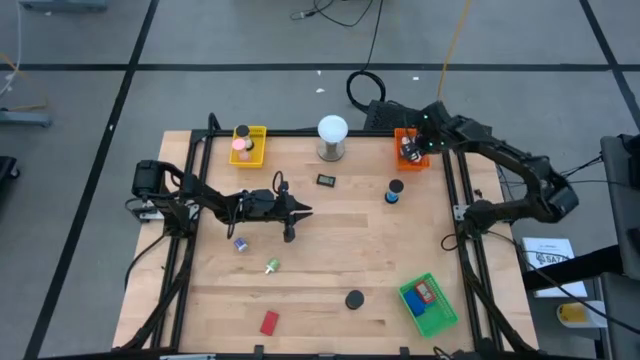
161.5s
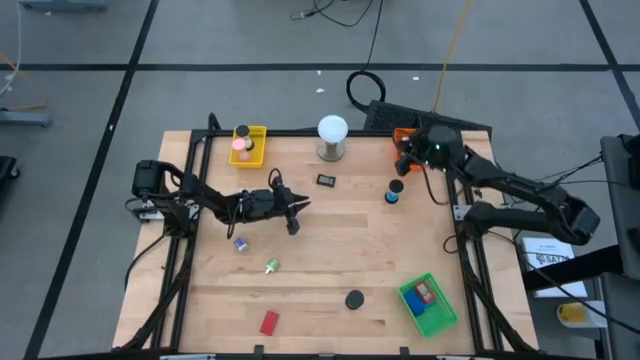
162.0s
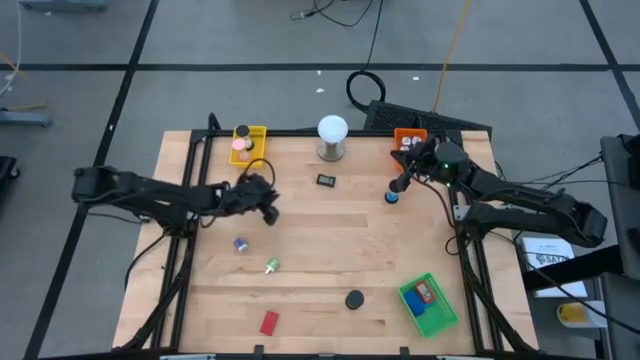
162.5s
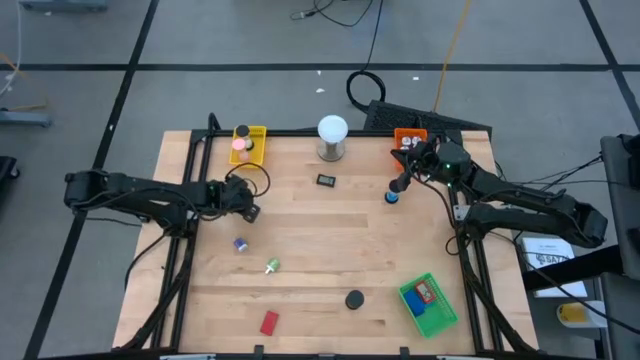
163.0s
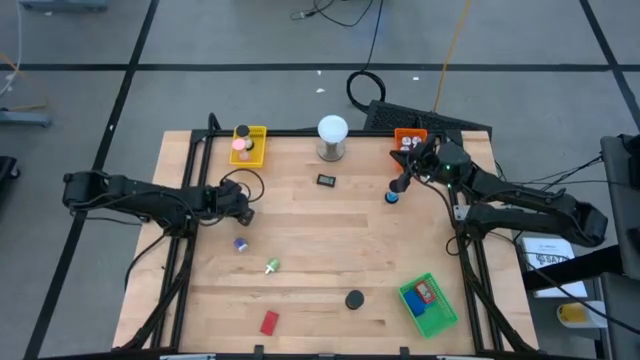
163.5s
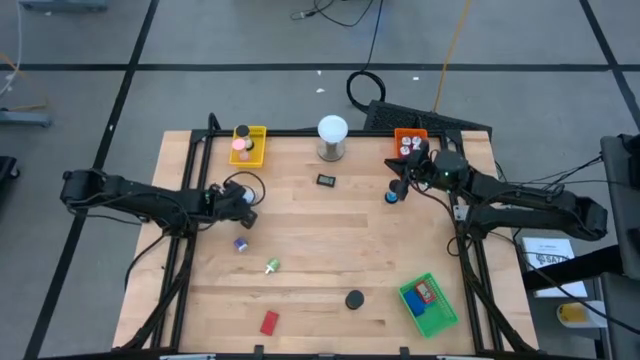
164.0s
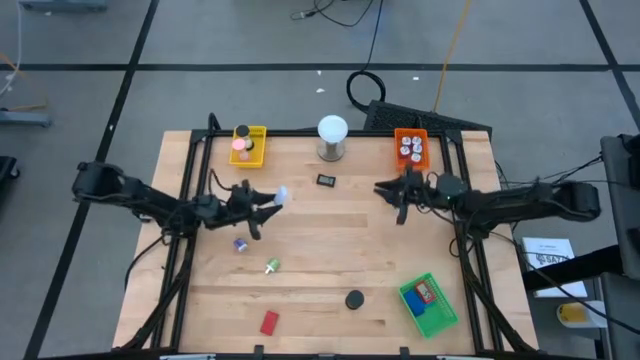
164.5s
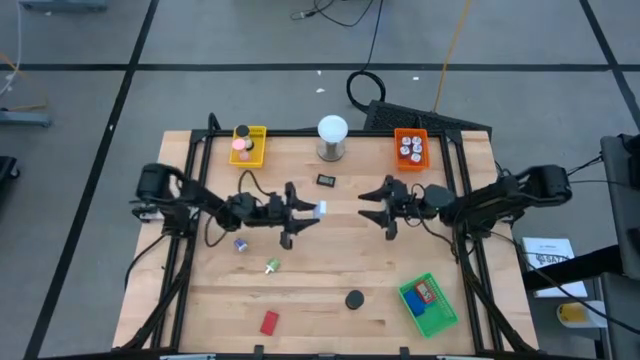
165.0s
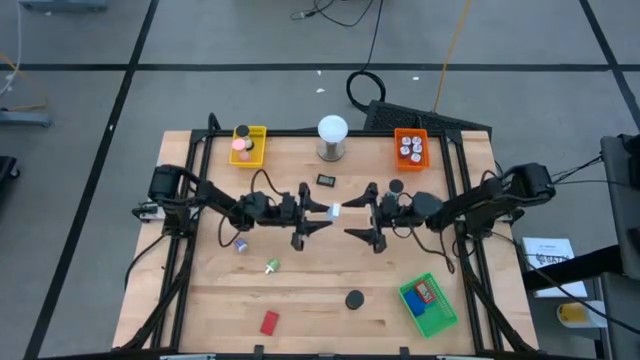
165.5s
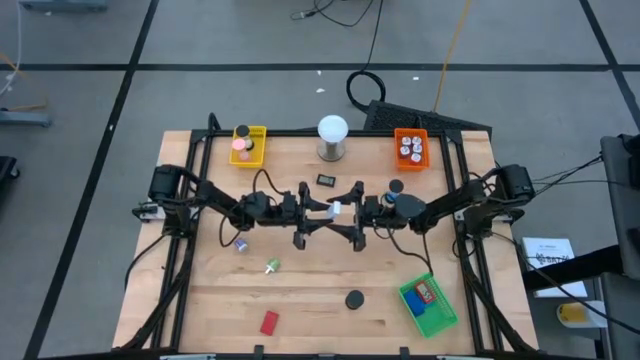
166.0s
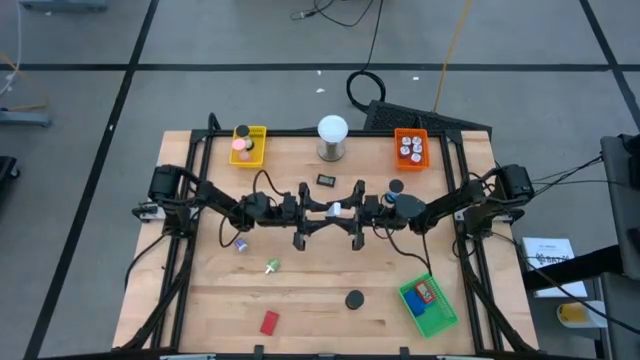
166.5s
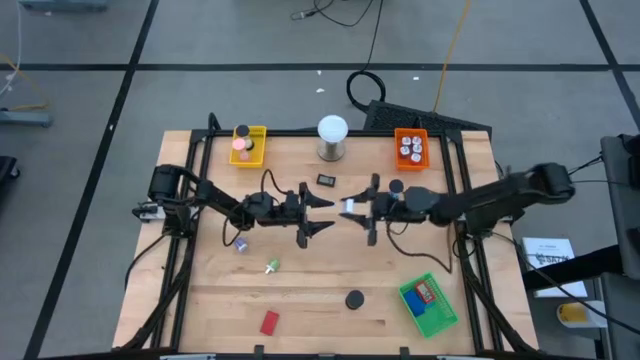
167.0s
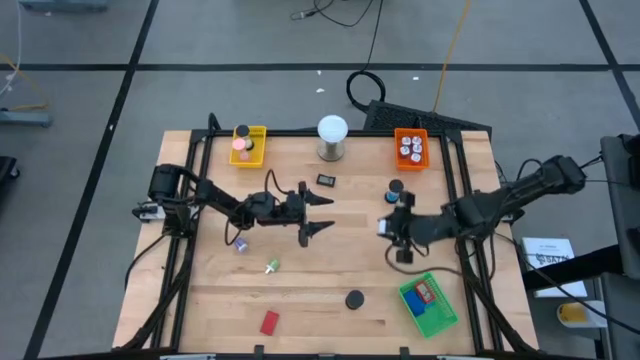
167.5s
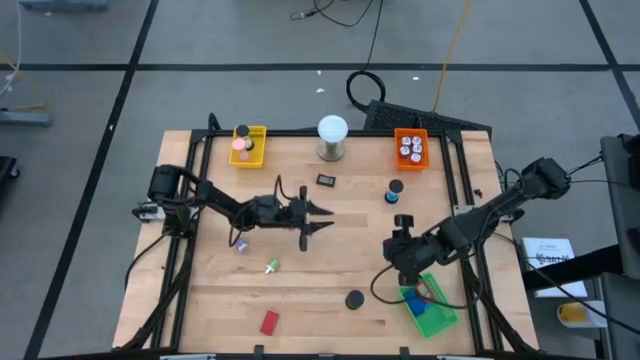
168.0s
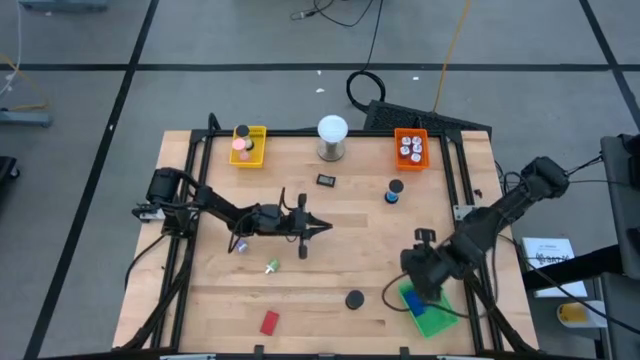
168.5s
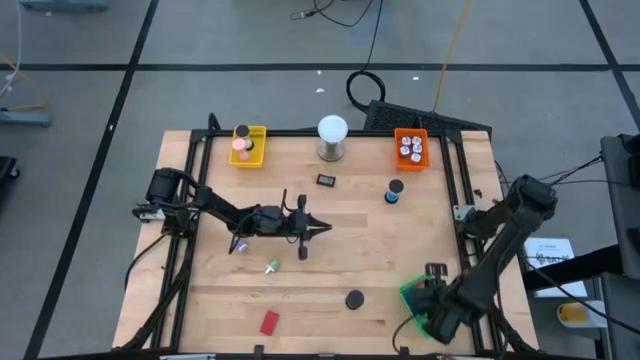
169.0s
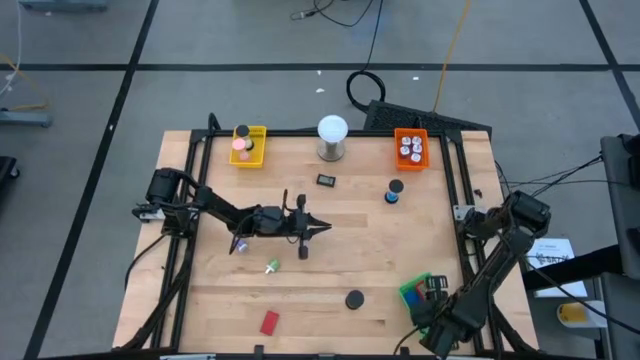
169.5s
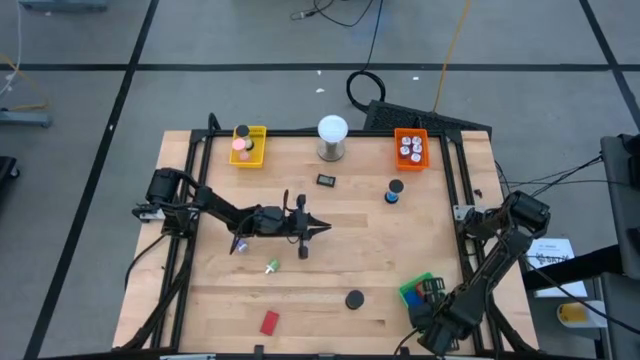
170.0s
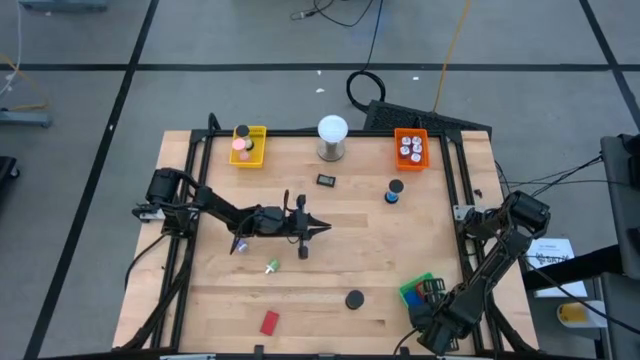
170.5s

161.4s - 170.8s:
Task: Pick & Place Office items
Put the white digital clock into the green bin

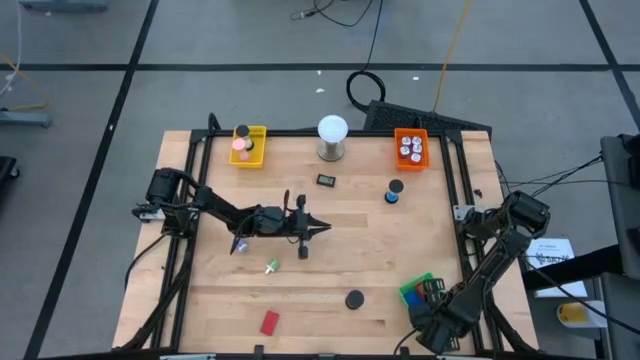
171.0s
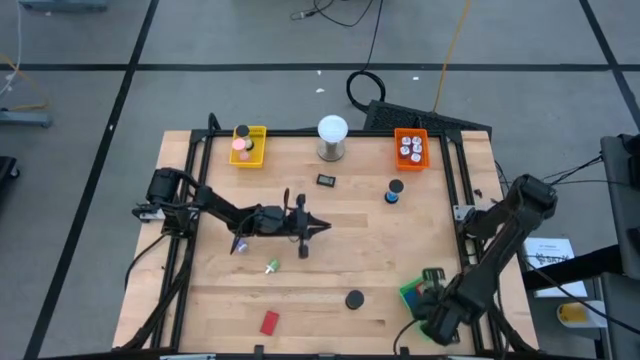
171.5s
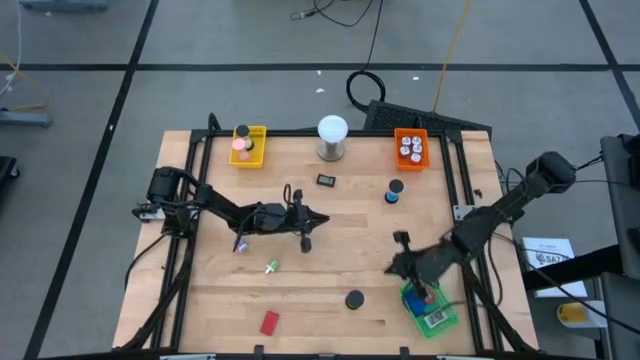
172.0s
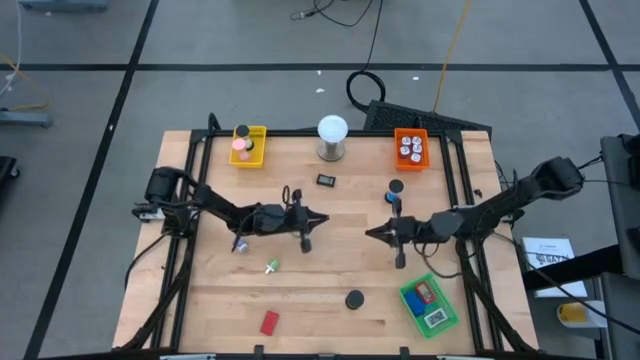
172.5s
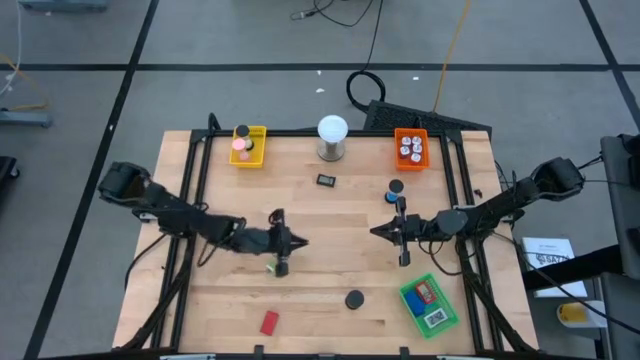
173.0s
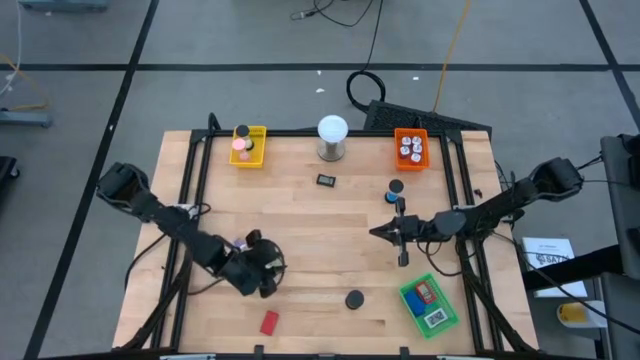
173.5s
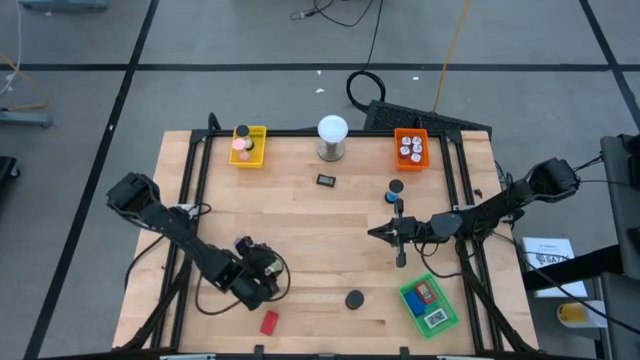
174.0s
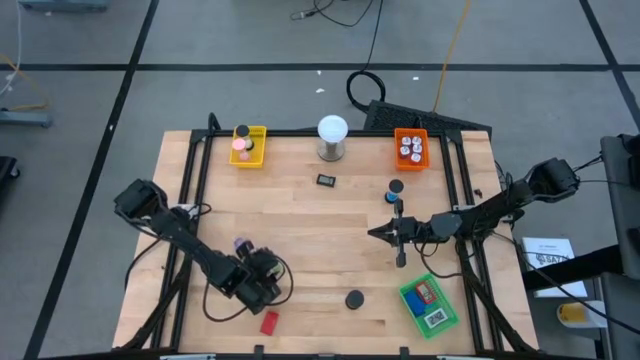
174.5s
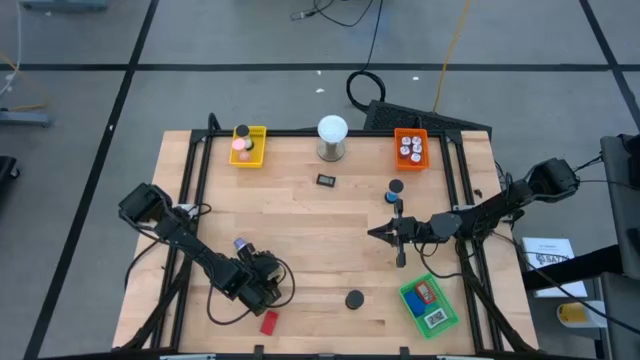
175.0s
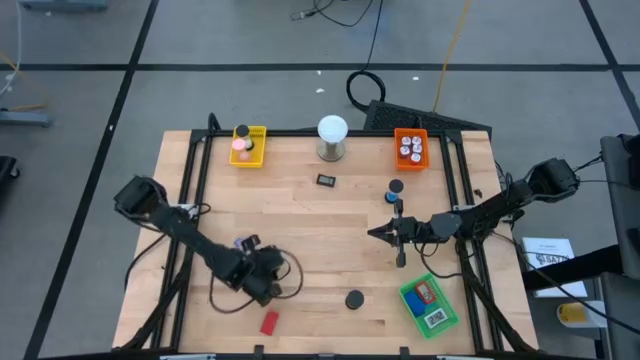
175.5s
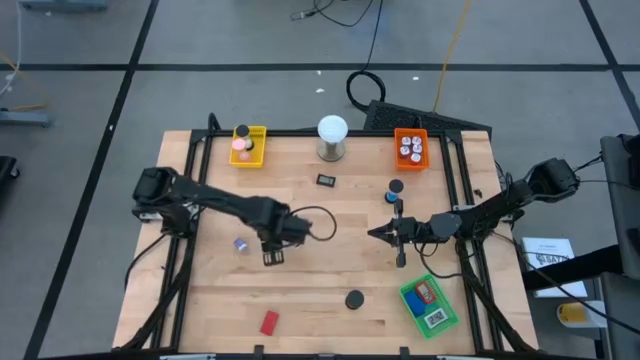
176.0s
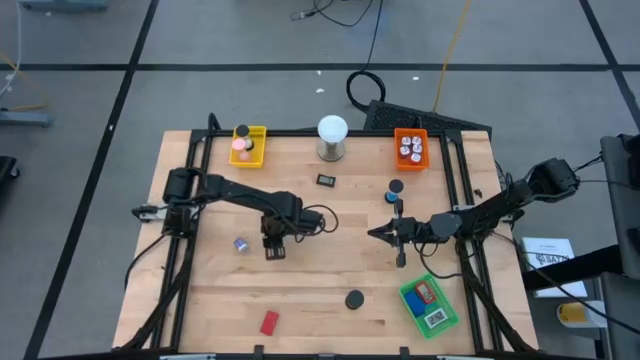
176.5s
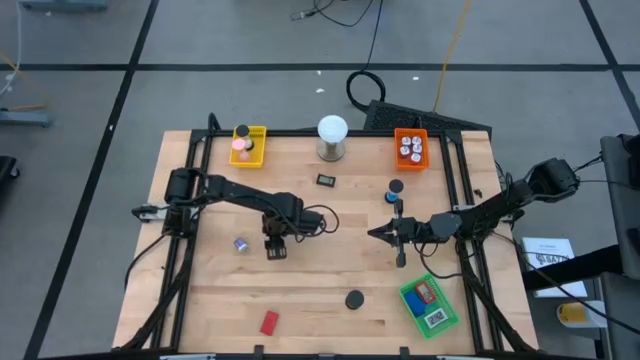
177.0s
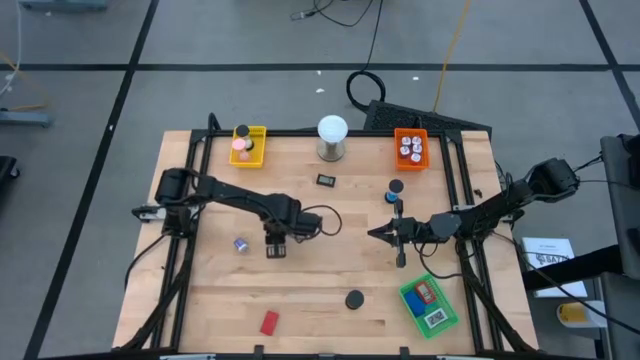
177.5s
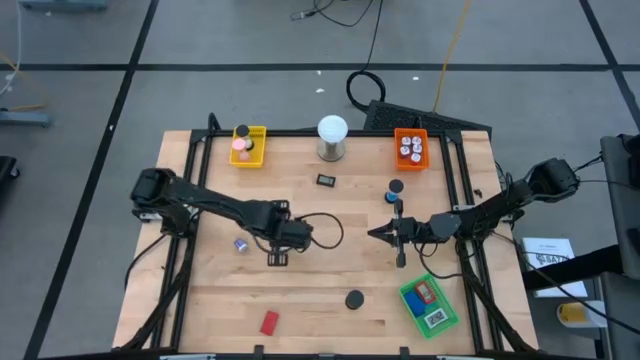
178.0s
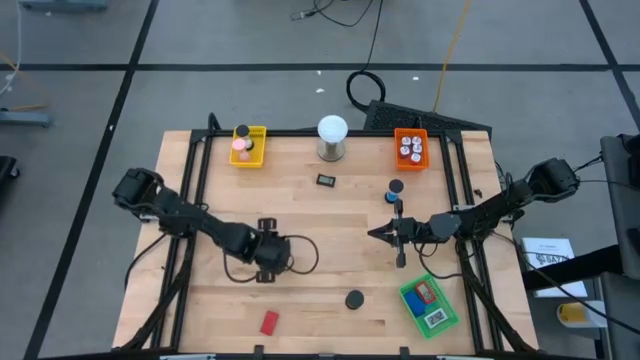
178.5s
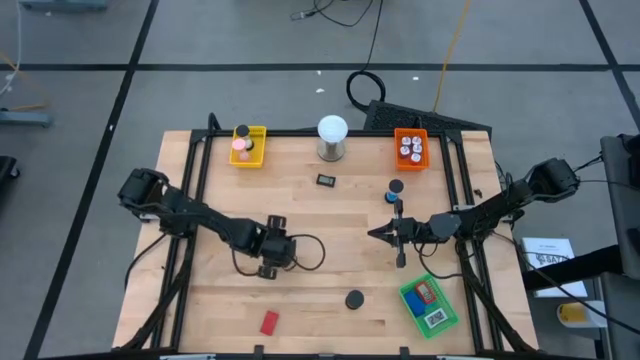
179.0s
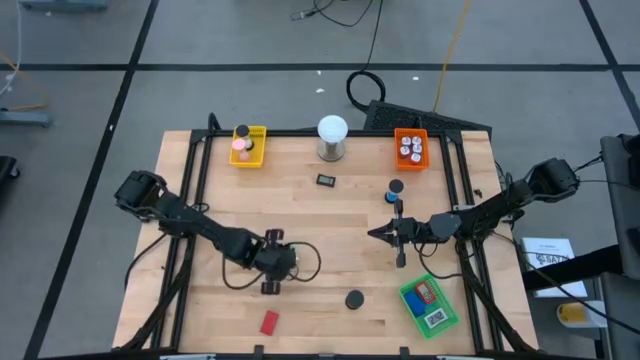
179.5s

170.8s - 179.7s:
Put the green charger adaptor into the orange bin
